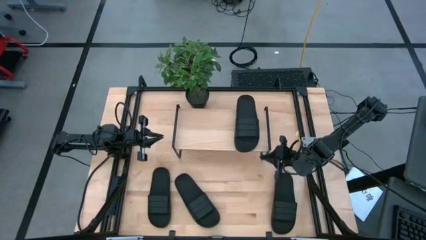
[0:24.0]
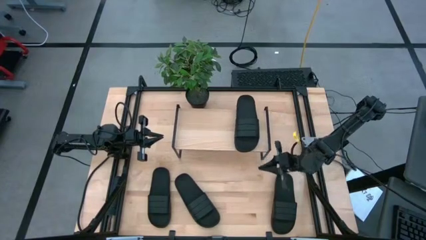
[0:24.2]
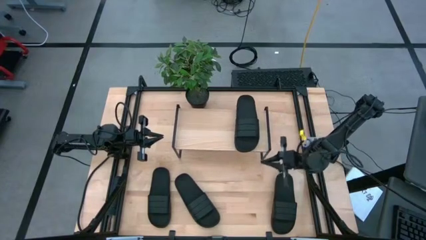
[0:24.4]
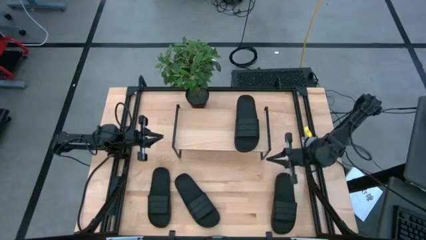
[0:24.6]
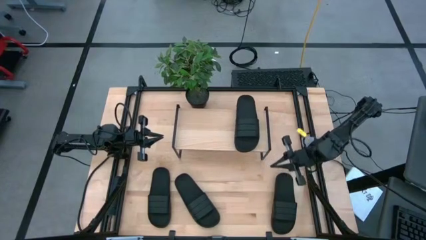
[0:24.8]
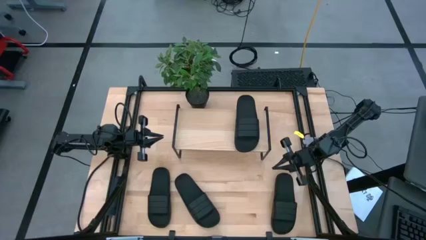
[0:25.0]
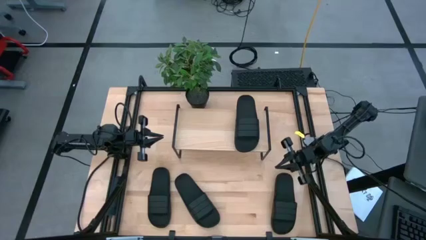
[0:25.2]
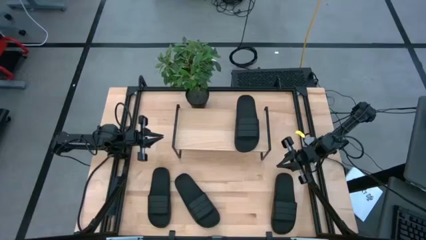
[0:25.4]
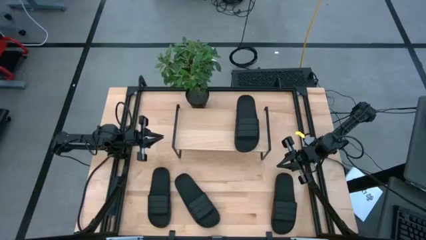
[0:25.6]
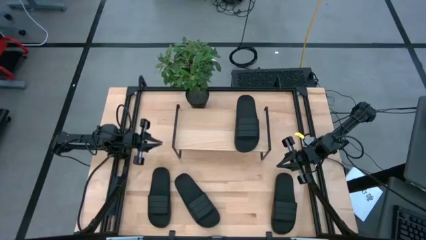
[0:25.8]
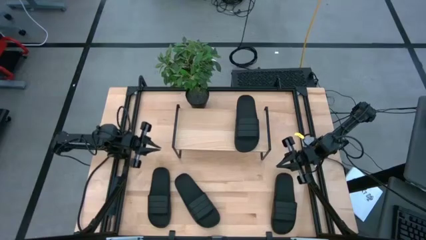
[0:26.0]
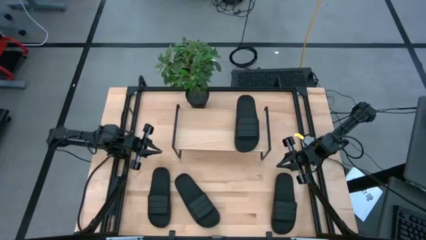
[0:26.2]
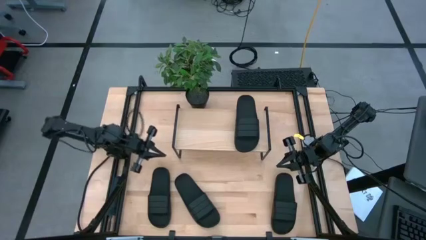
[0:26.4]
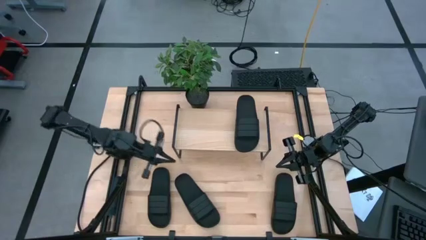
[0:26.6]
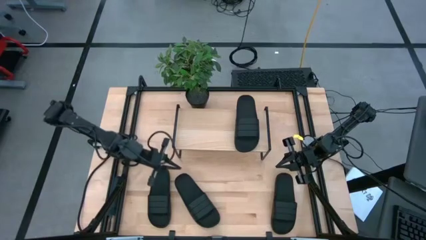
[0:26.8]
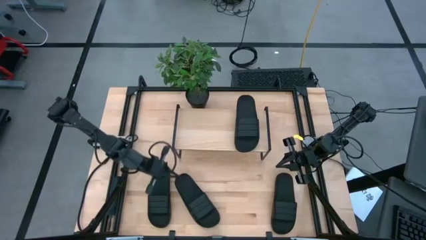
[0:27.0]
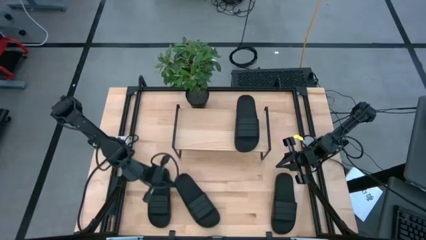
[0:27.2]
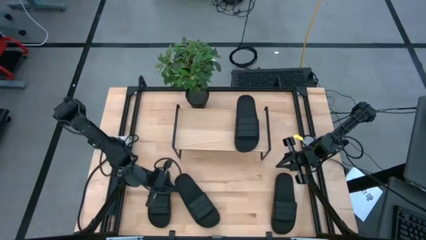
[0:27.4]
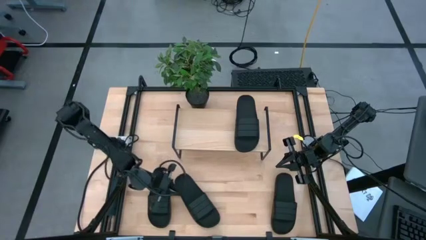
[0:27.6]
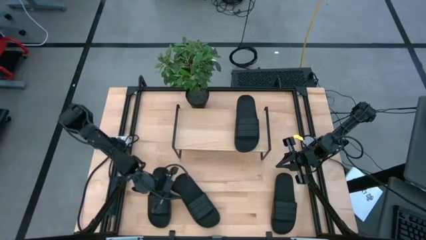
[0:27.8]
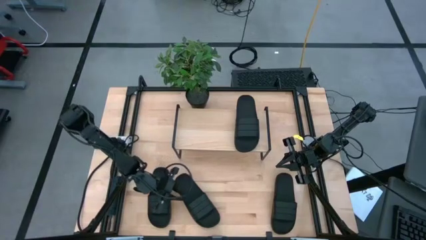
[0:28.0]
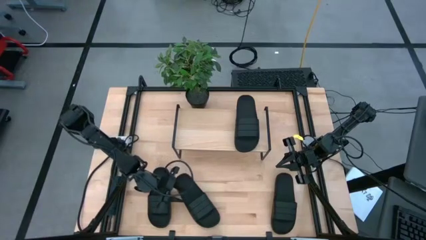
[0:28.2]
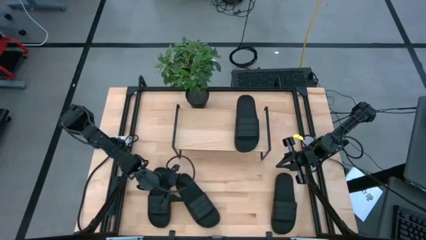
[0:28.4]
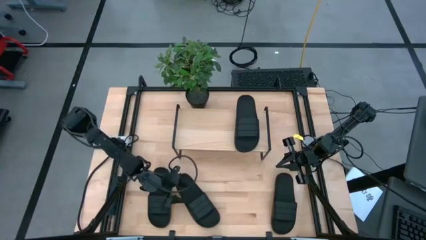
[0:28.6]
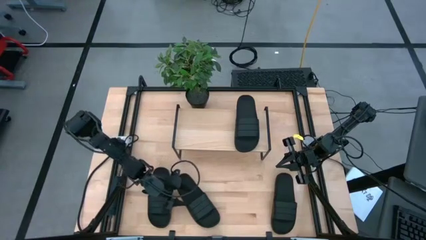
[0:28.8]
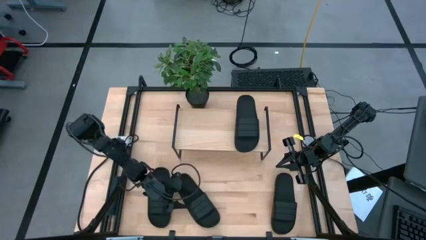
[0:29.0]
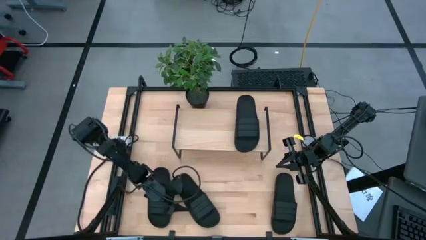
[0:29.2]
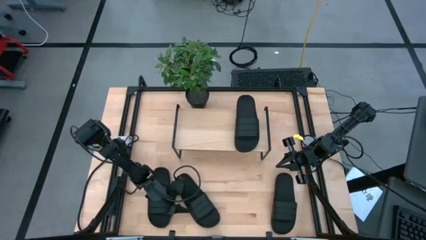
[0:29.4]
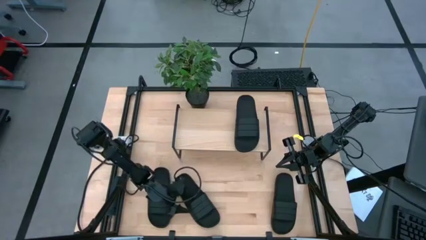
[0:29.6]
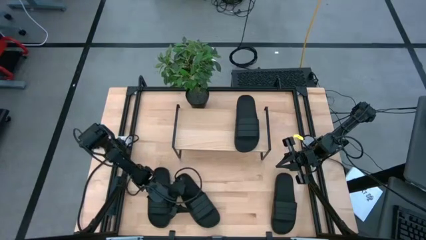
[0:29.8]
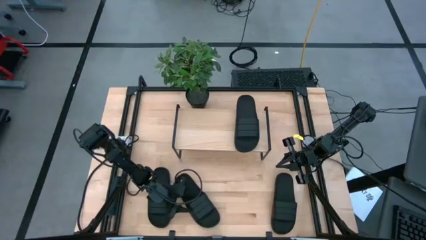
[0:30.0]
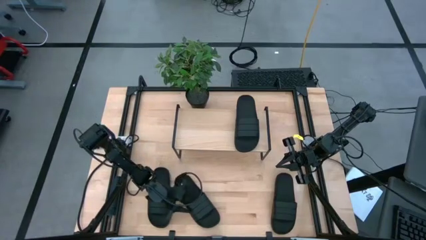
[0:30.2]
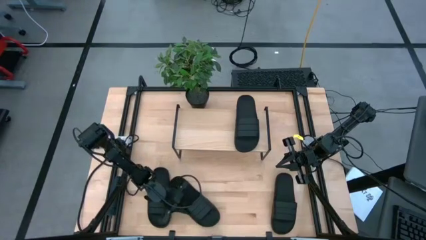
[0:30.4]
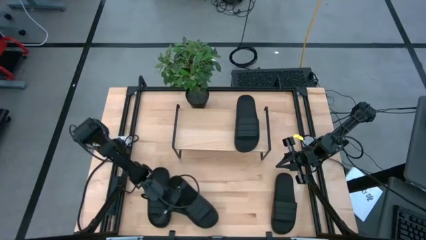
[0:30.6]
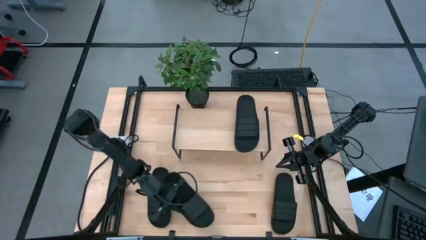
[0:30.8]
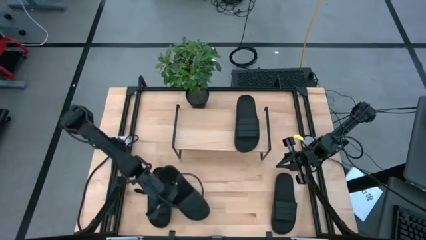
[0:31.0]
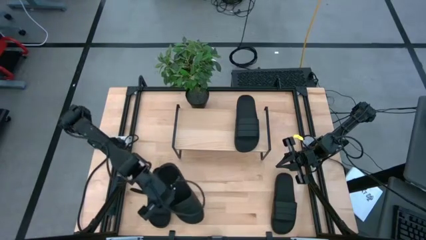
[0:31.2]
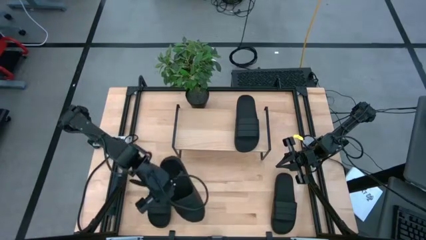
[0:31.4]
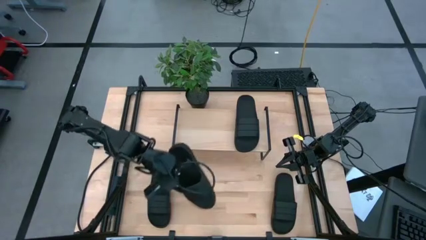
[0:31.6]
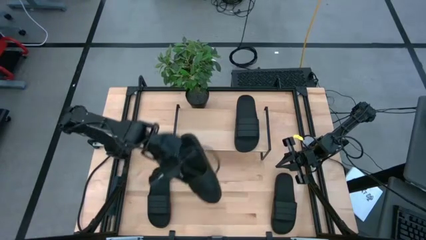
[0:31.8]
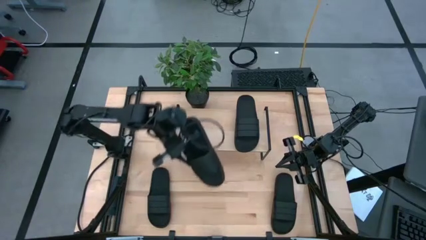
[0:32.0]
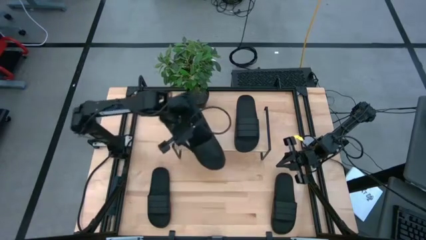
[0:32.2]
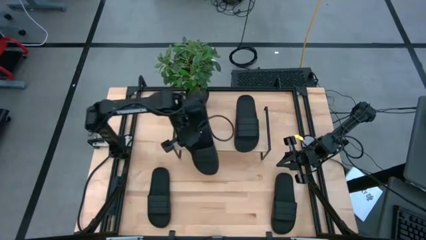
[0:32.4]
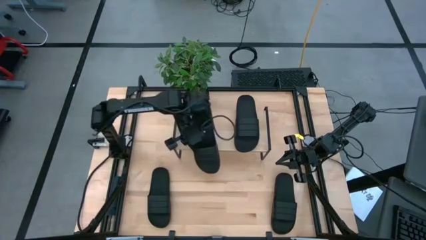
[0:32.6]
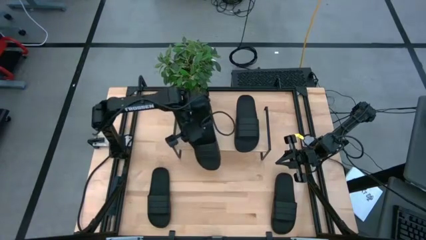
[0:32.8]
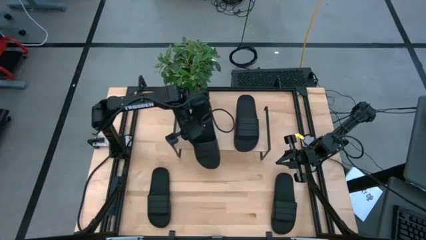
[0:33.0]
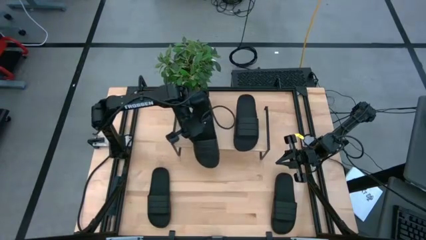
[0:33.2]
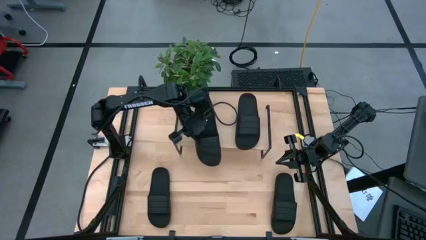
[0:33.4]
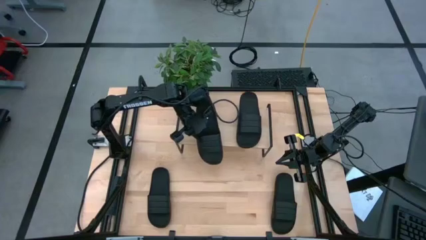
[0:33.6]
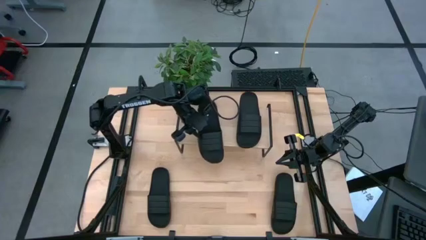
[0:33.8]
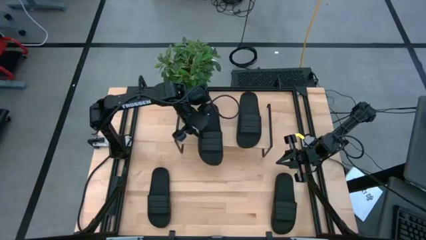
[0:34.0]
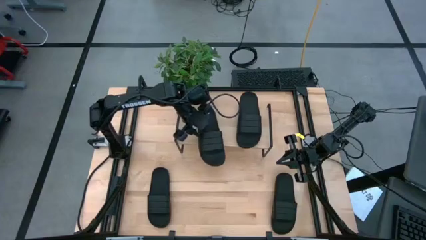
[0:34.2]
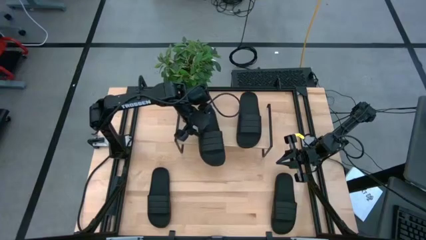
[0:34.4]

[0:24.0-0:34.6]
Task: Pick and place slides into the shelf
Put the middle black slide on the shelf
